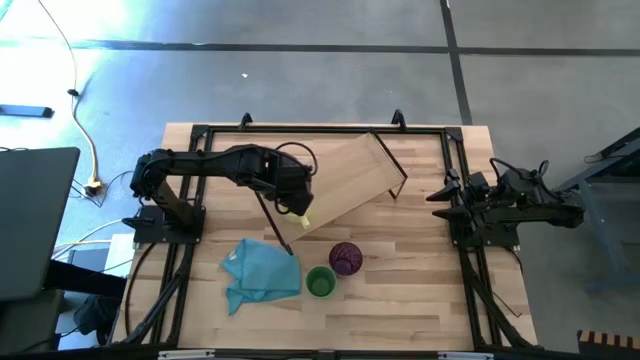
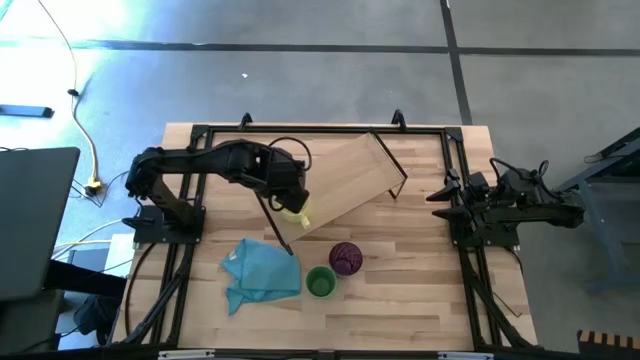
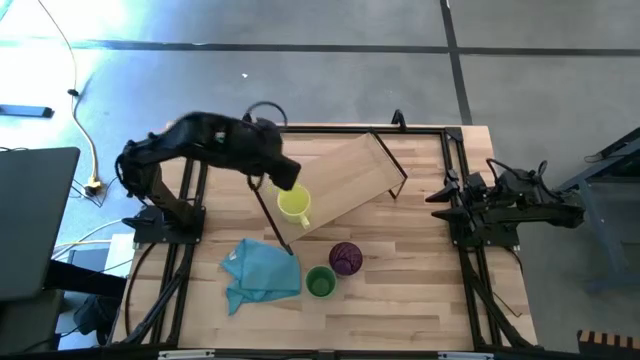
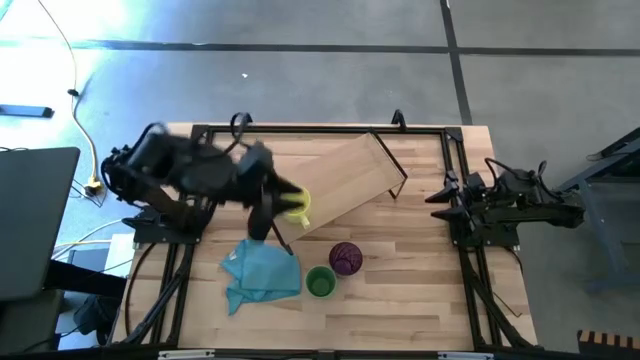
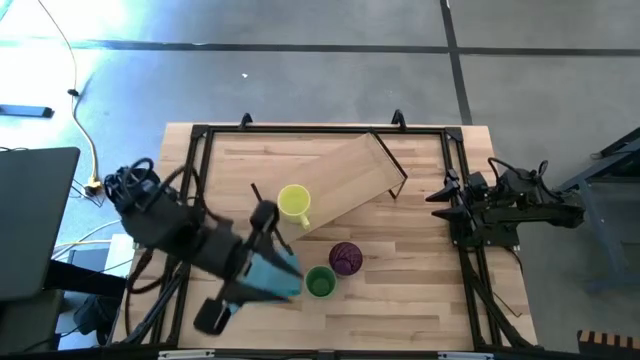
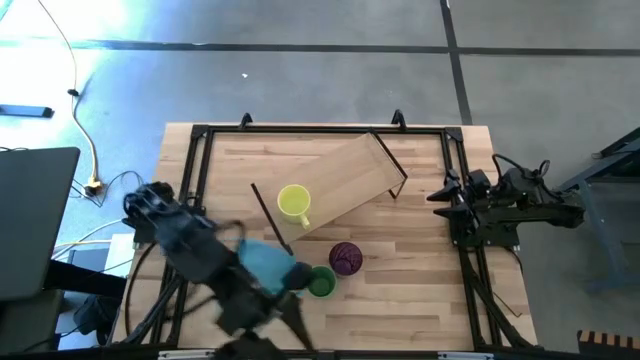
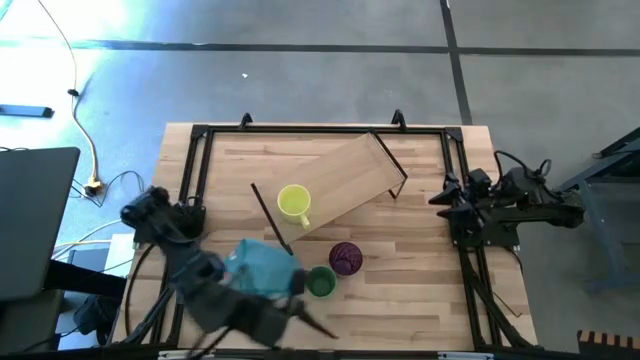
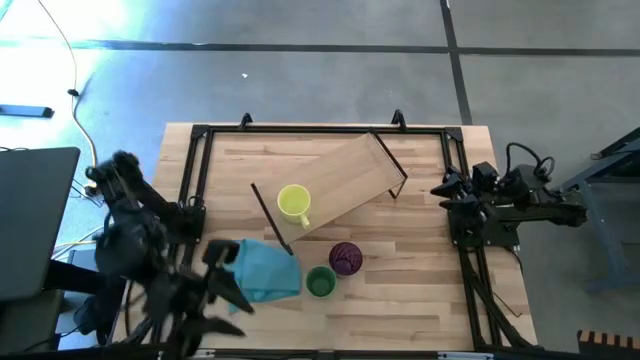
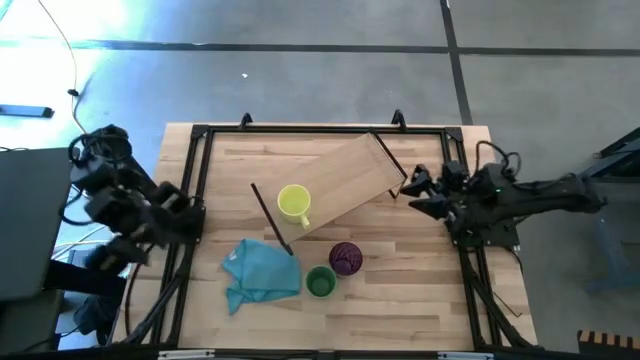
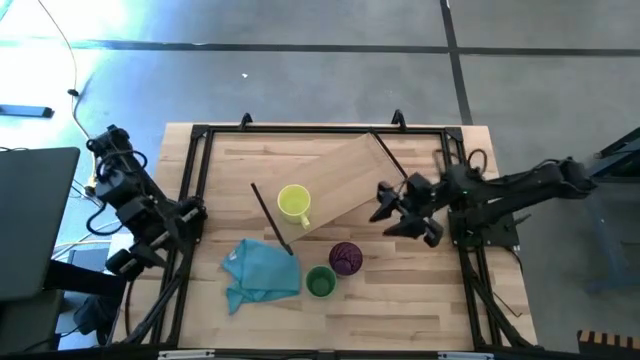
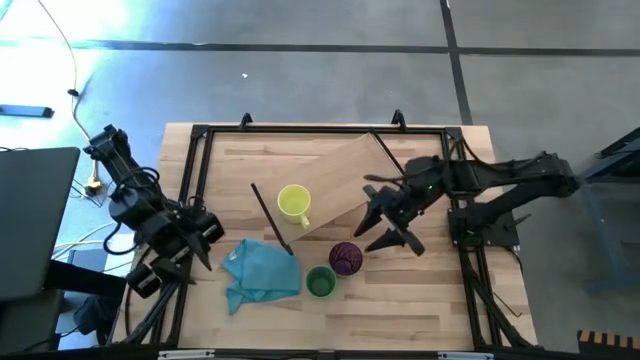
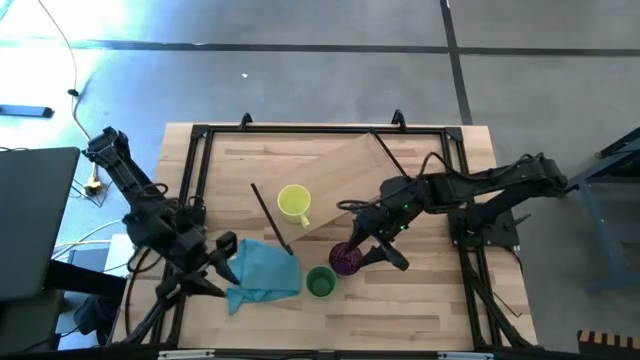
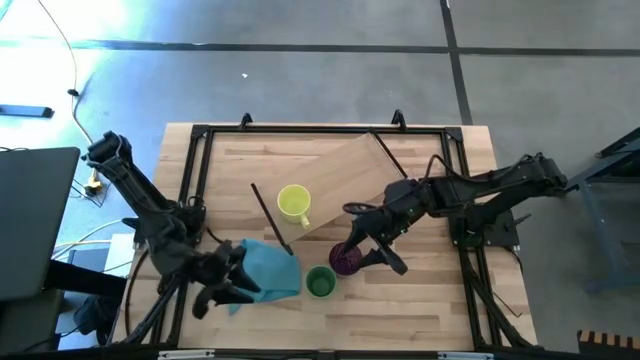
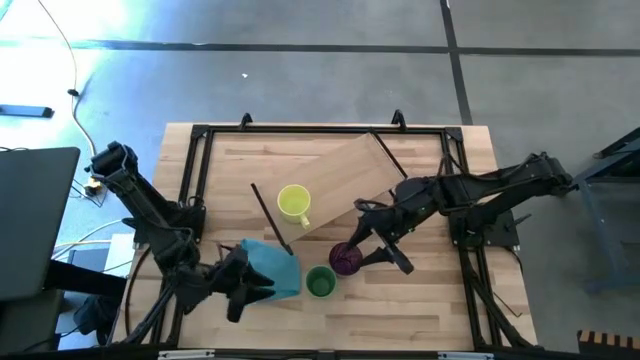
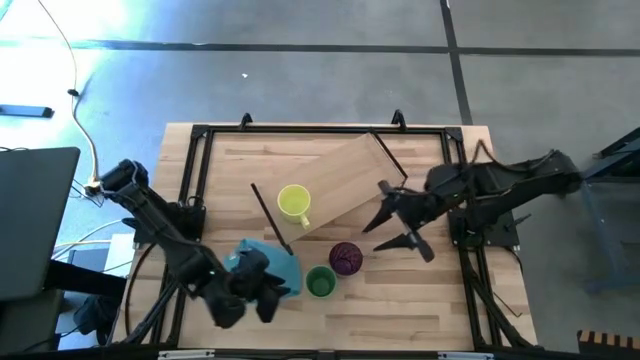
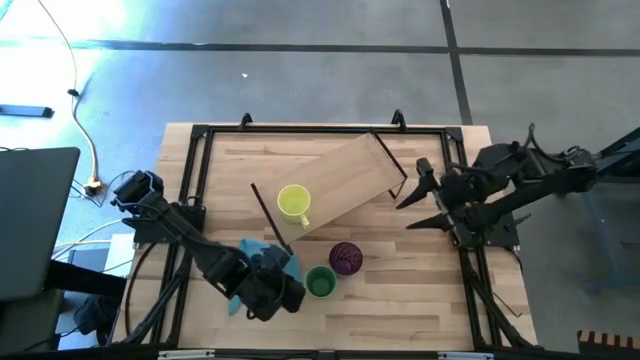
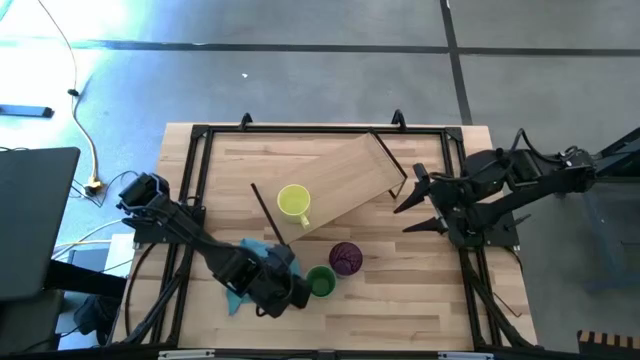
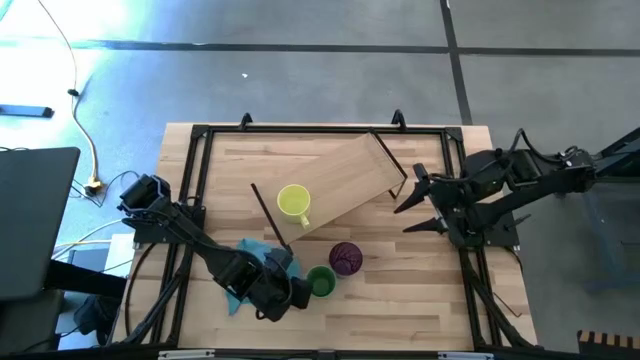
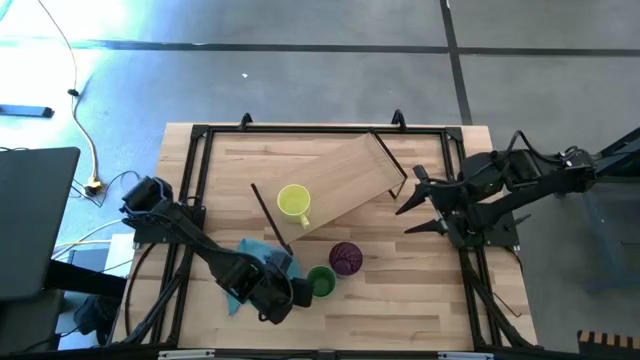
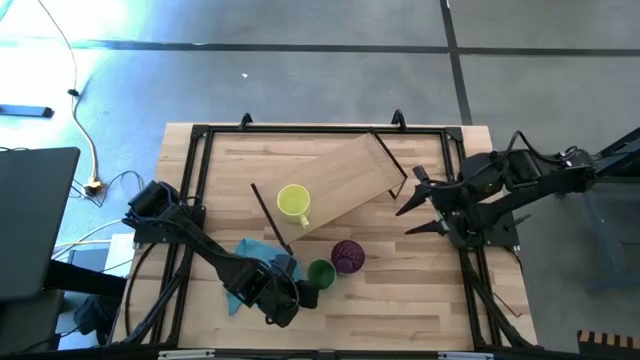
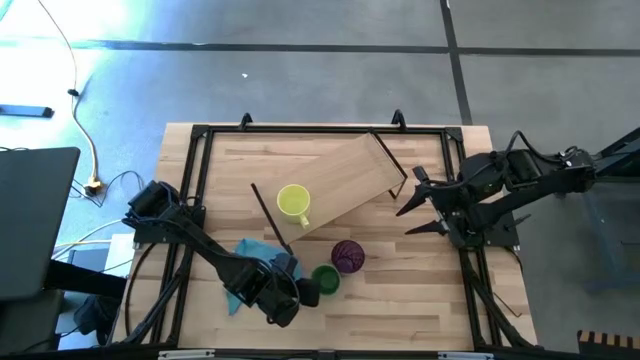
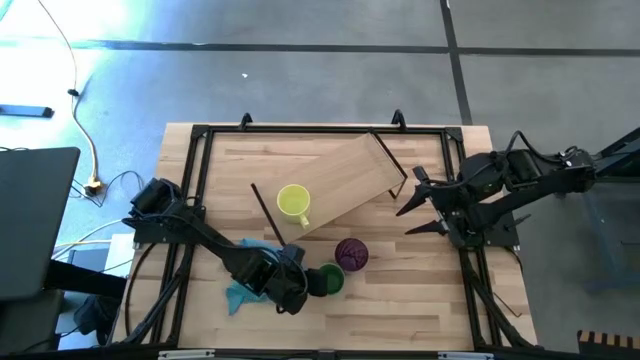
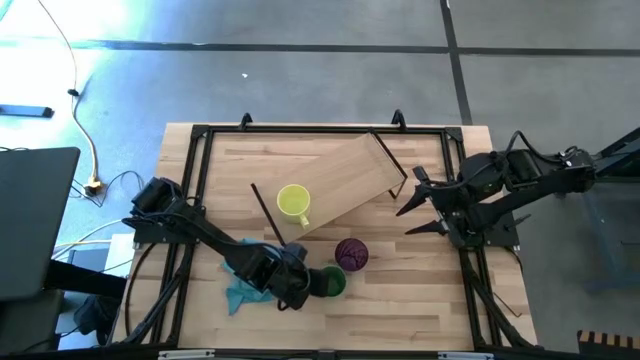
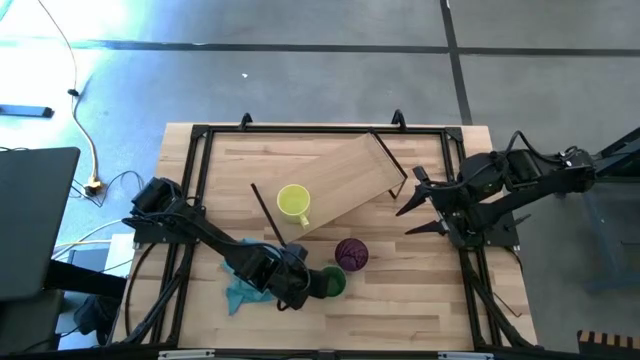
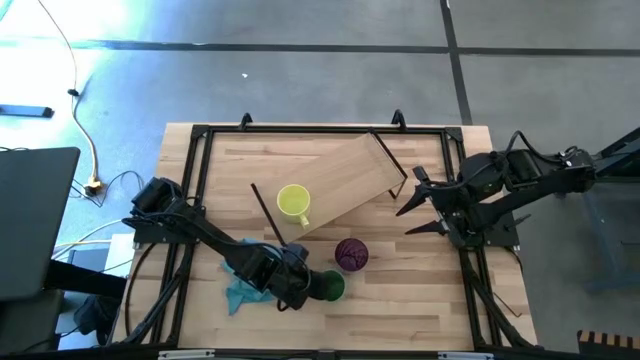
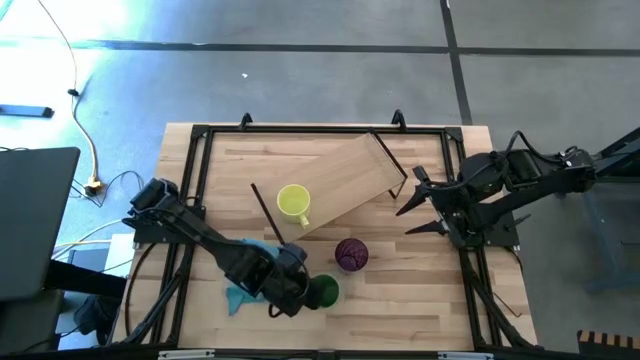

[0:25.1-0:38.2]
Task: Stack small to large cups/mugs on shelf
Put the green cup on the shelf

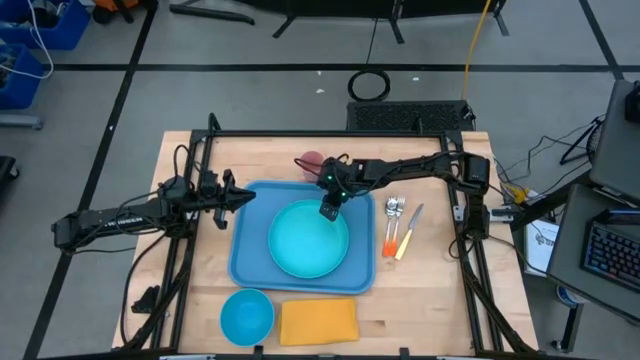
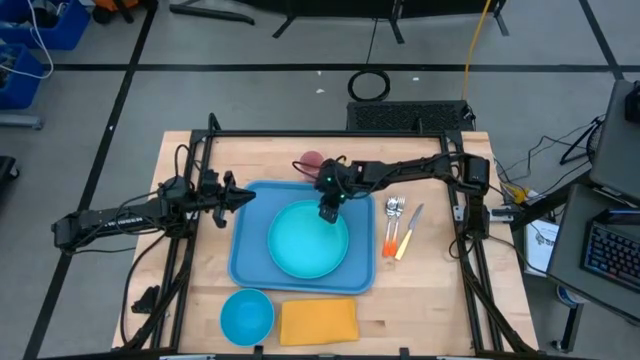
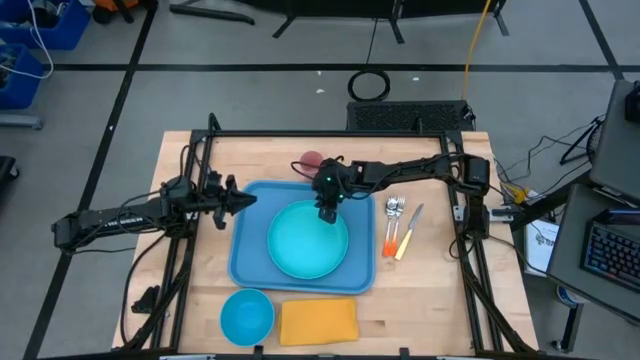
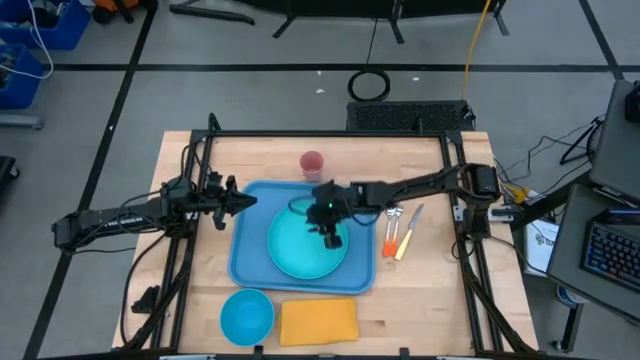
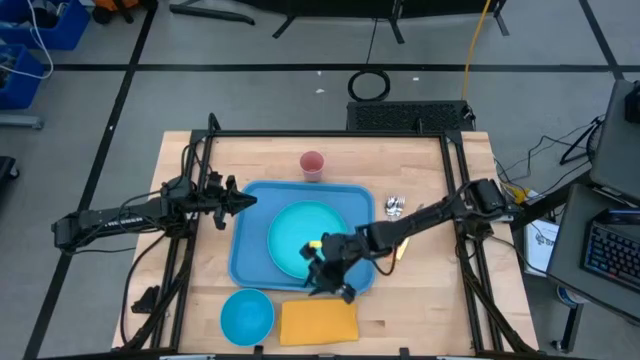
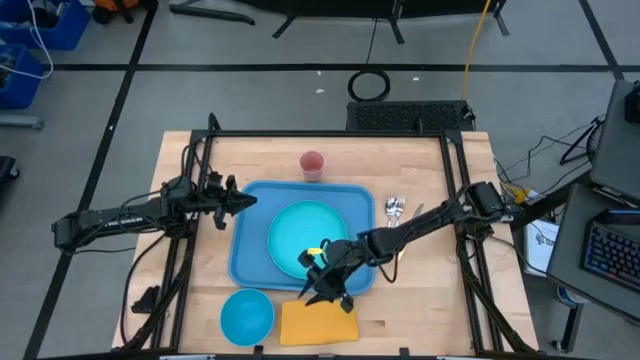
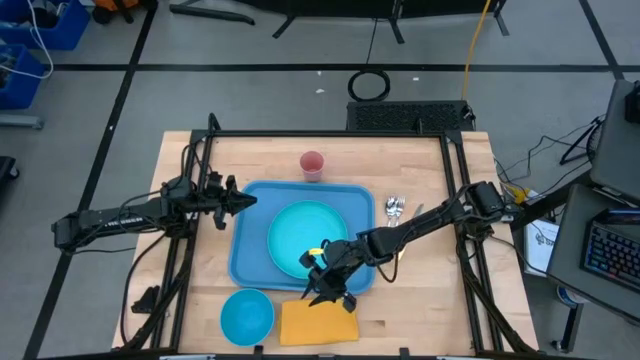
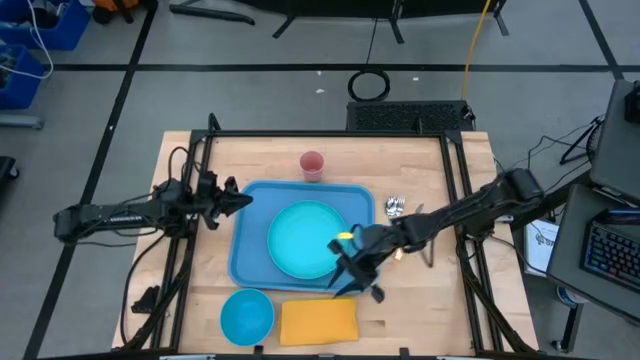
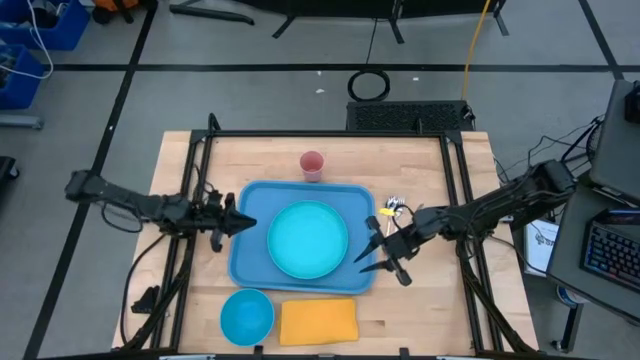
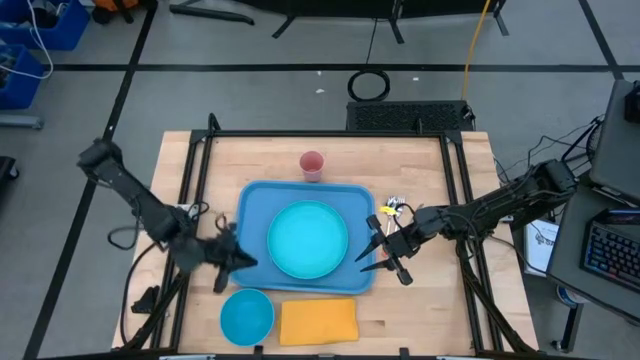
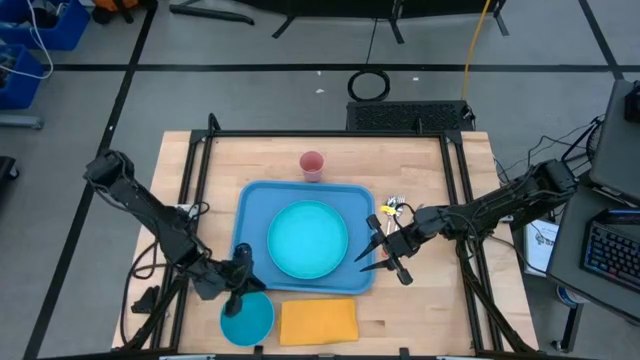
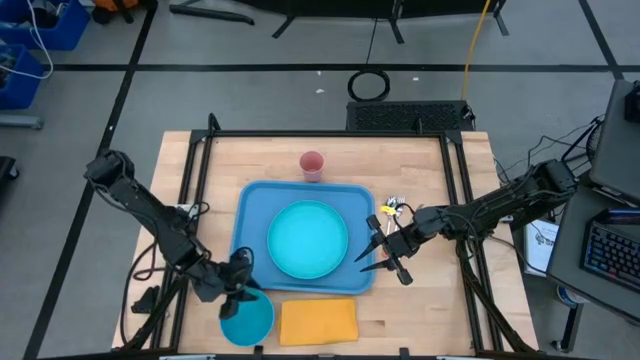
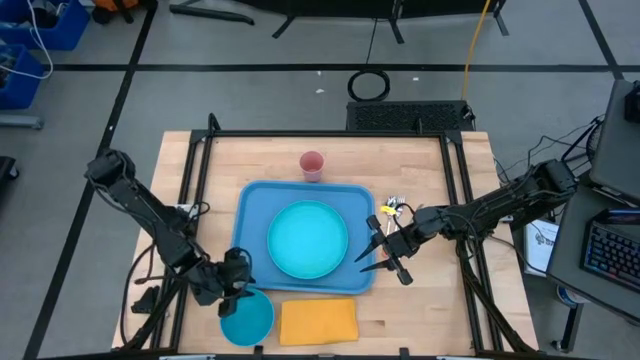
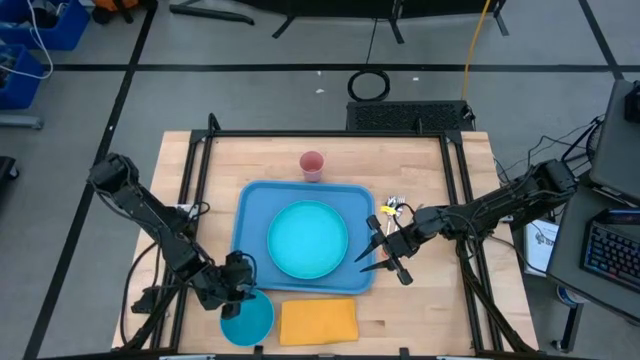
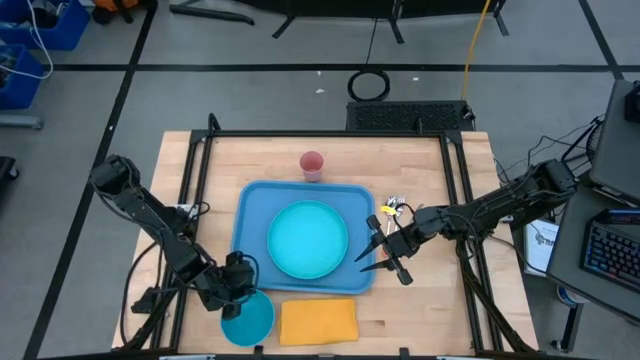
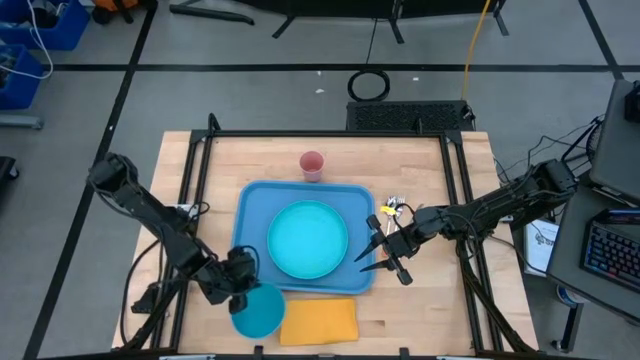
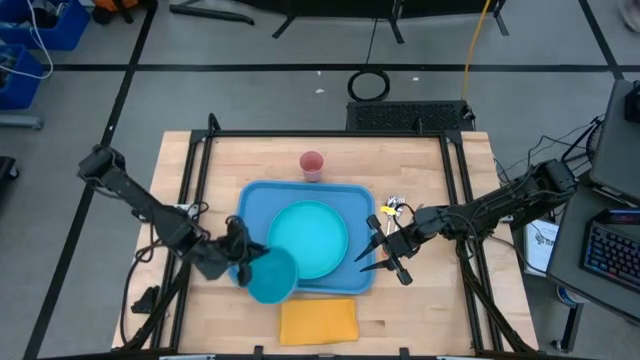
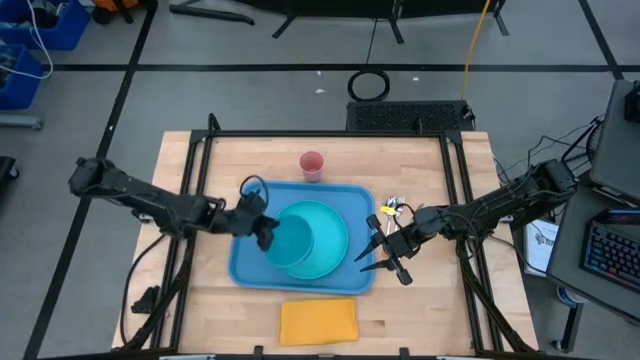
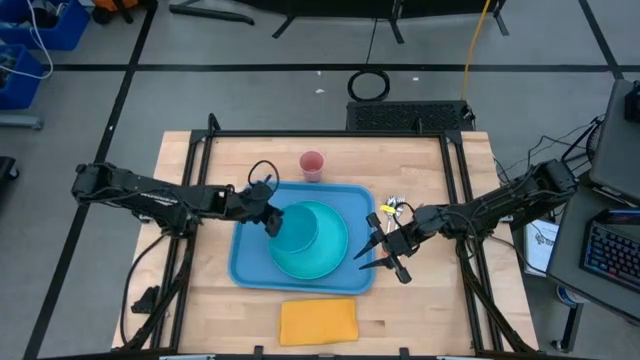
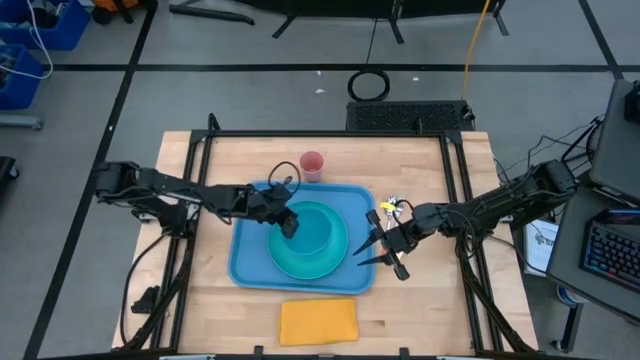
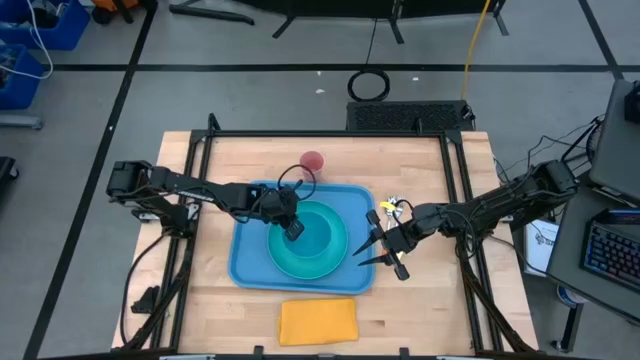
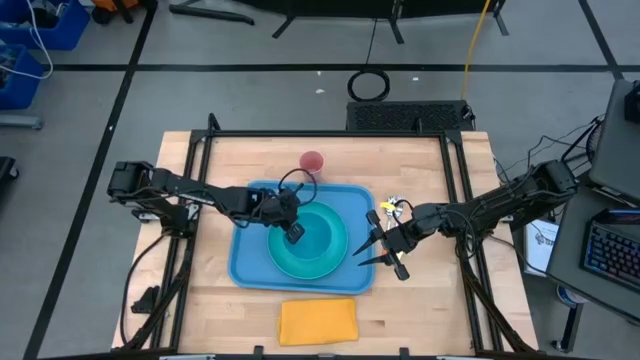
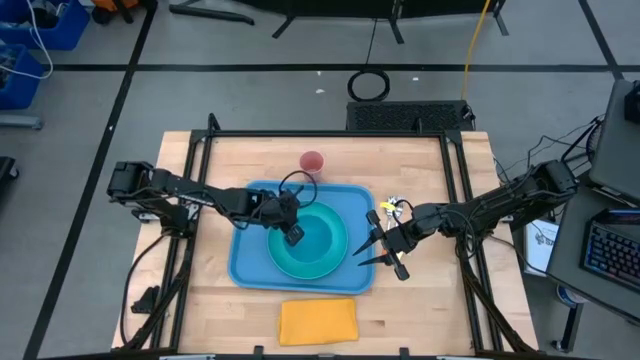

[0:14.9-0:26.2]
Task: Set up tray
Put the blue bowl on the green plate
